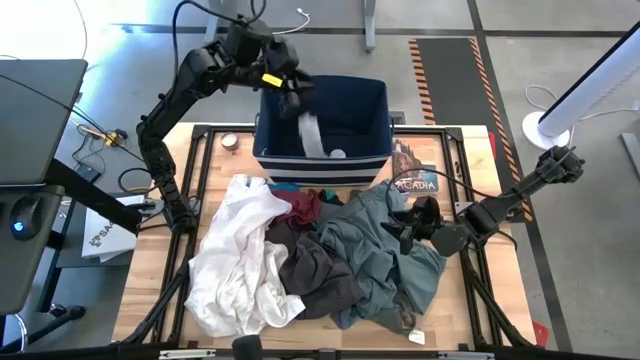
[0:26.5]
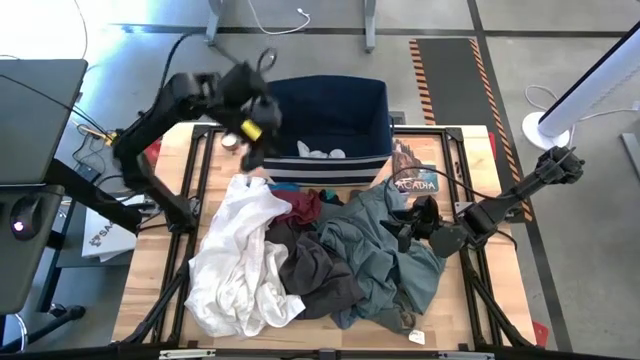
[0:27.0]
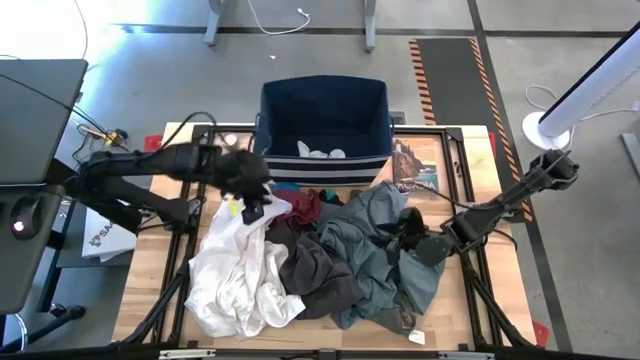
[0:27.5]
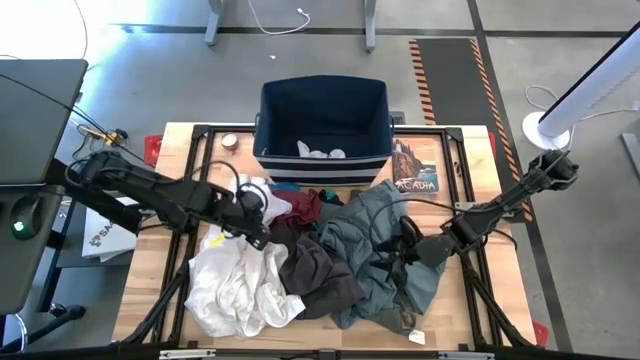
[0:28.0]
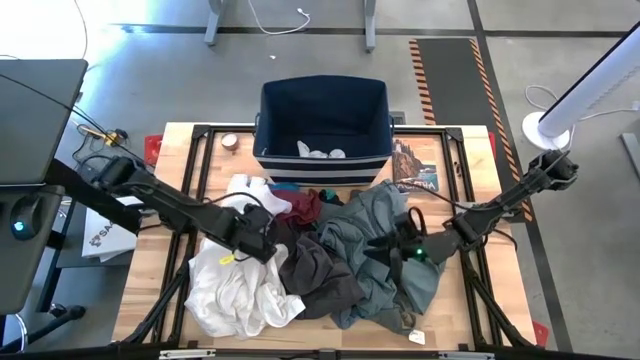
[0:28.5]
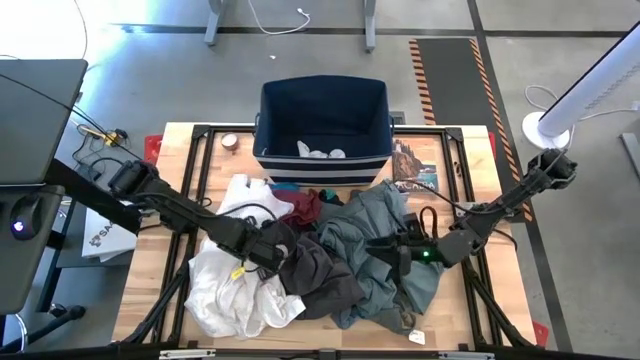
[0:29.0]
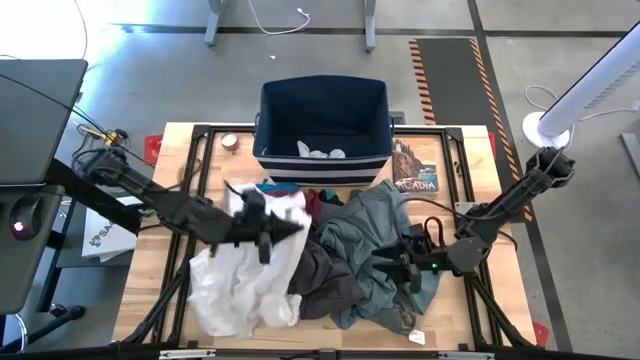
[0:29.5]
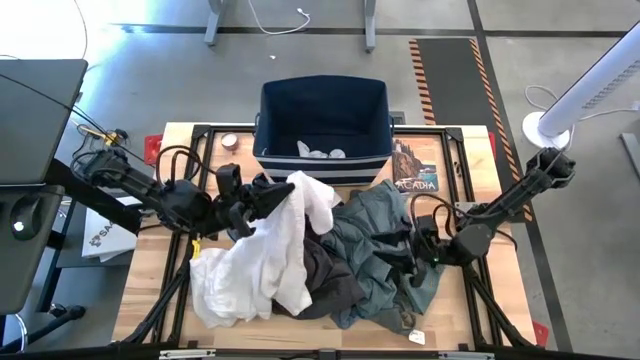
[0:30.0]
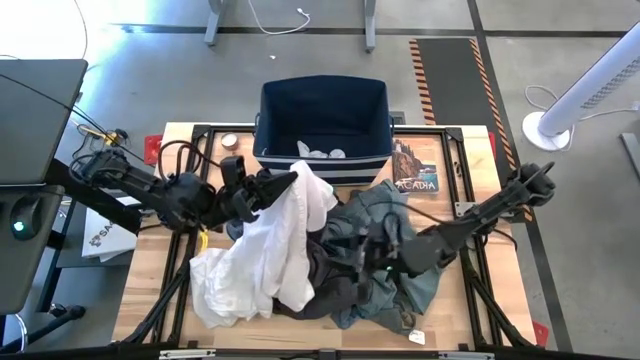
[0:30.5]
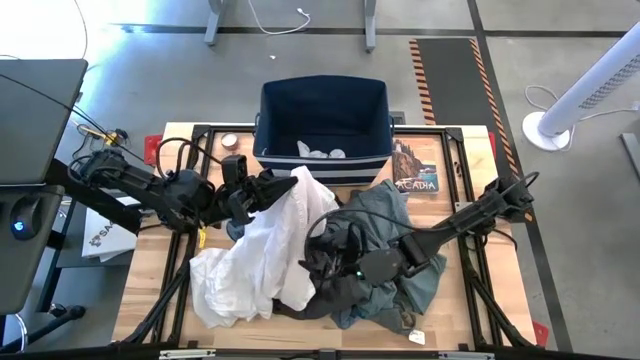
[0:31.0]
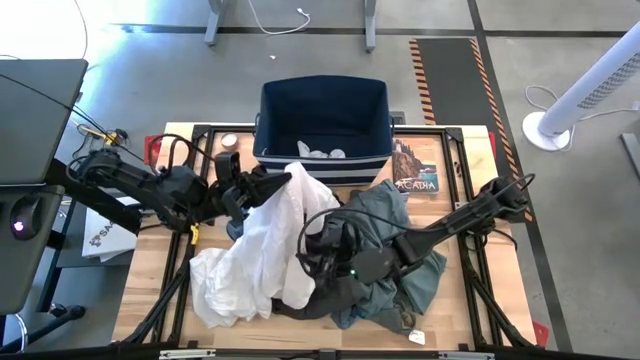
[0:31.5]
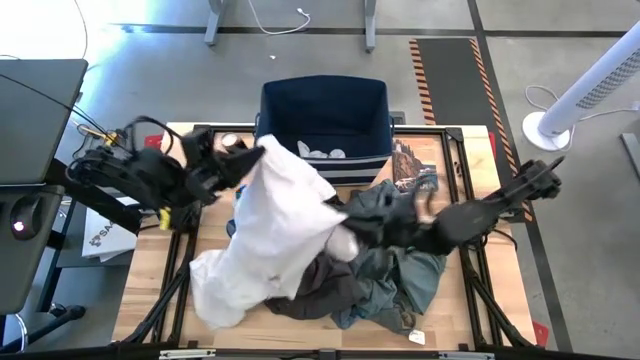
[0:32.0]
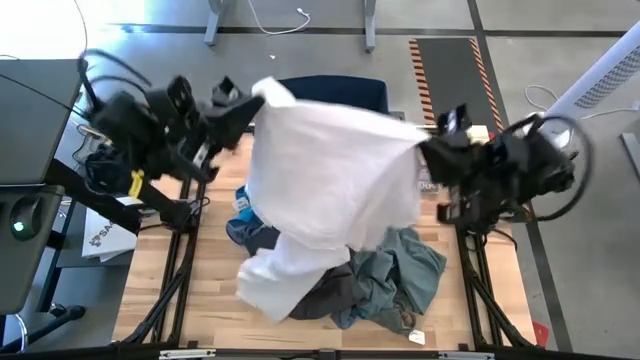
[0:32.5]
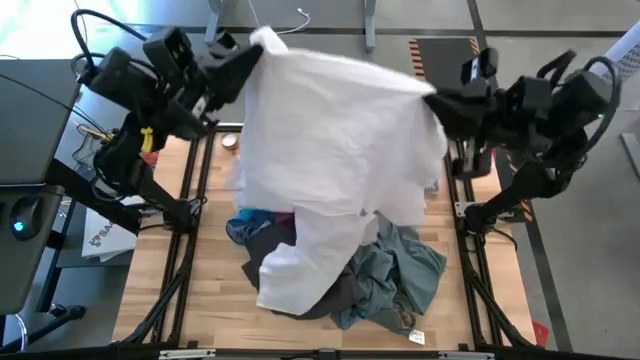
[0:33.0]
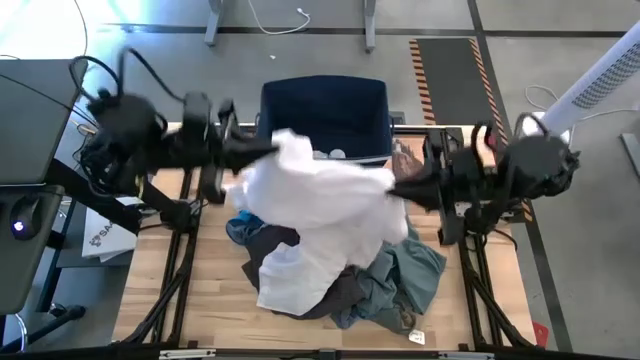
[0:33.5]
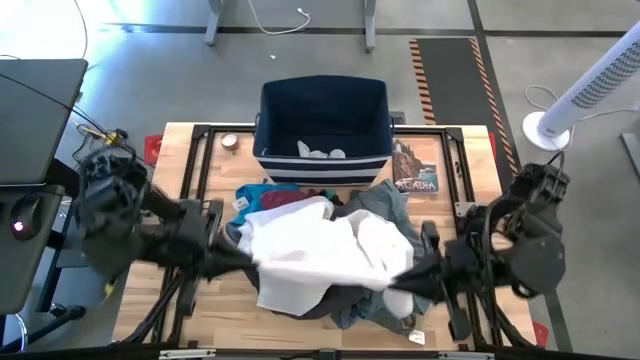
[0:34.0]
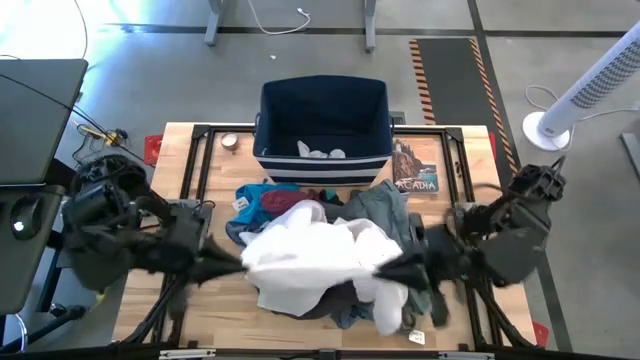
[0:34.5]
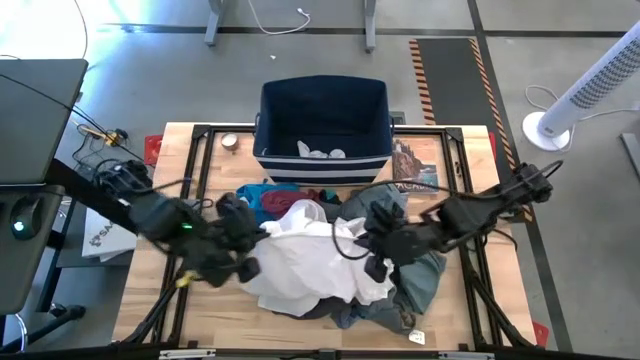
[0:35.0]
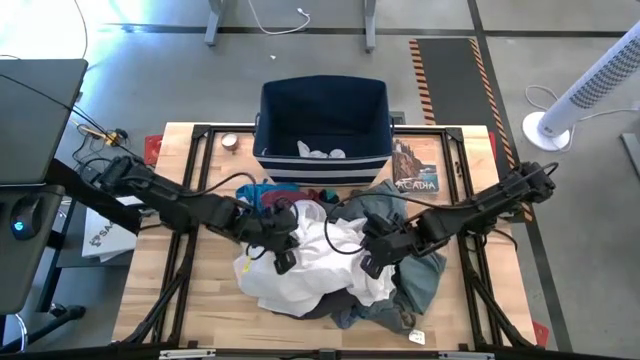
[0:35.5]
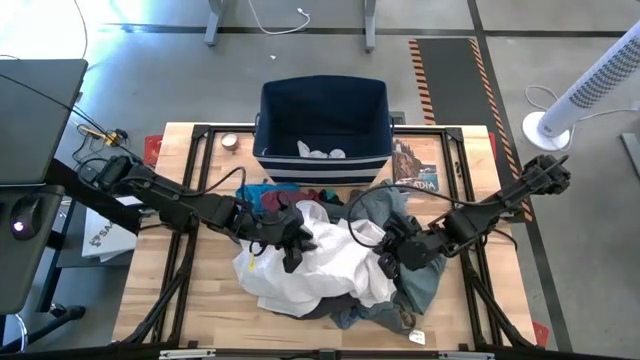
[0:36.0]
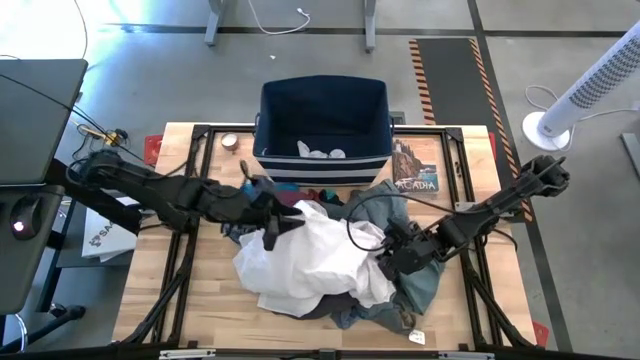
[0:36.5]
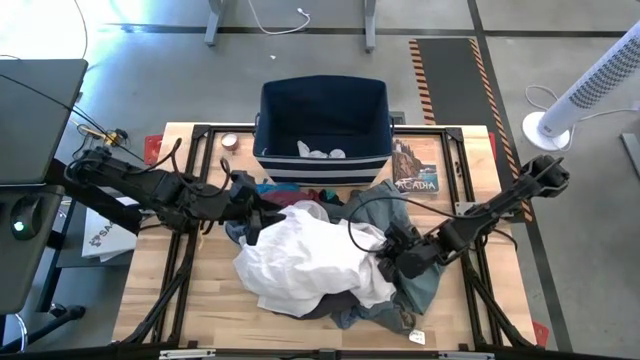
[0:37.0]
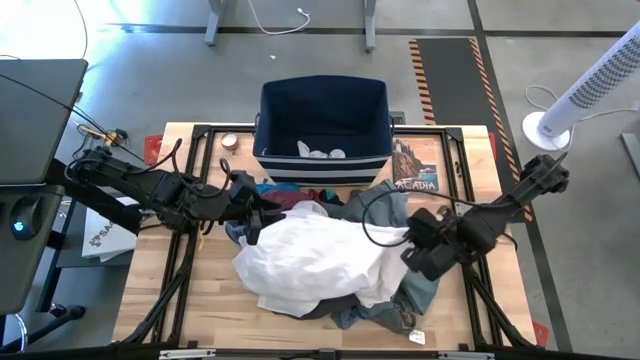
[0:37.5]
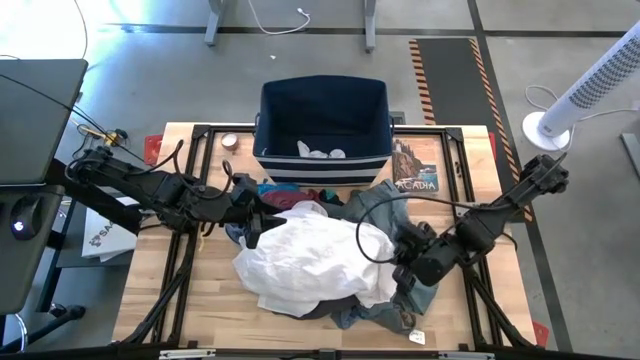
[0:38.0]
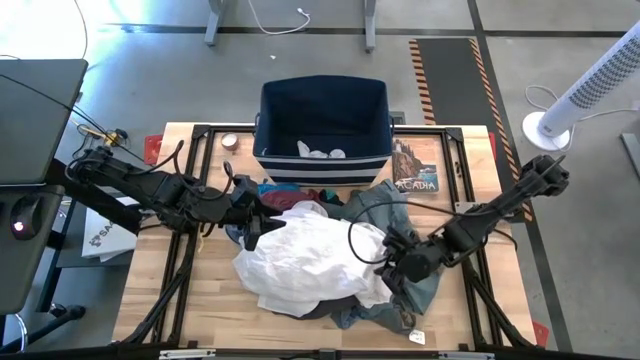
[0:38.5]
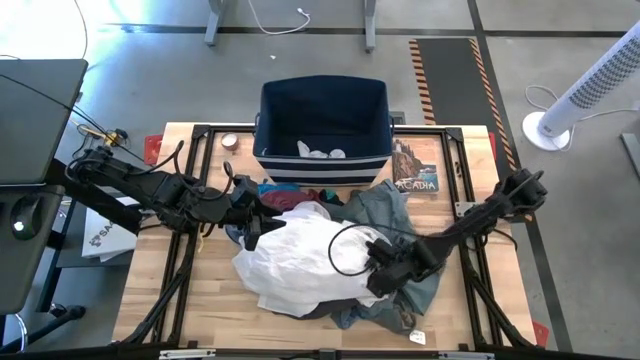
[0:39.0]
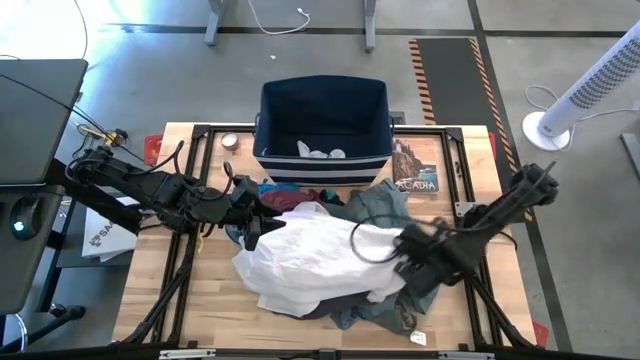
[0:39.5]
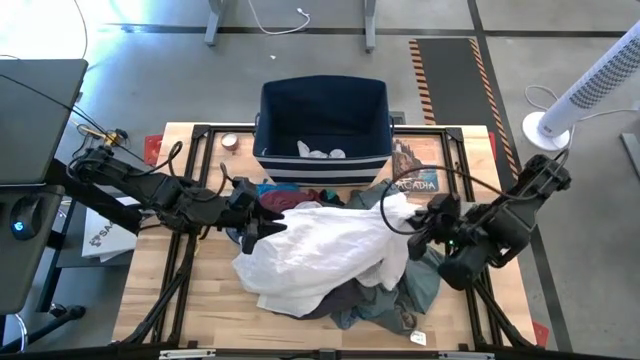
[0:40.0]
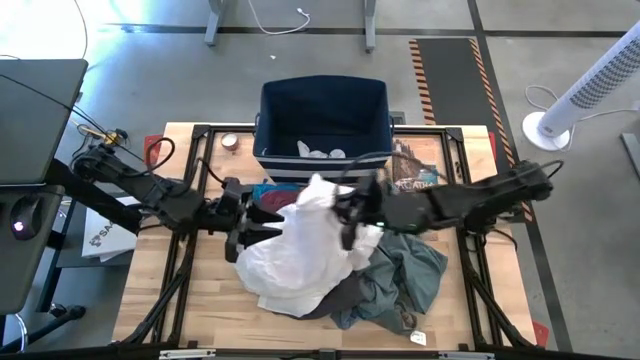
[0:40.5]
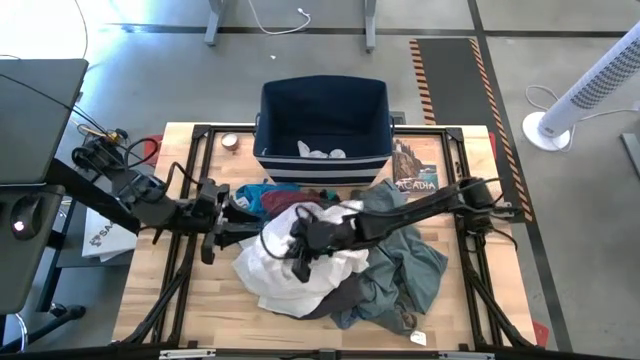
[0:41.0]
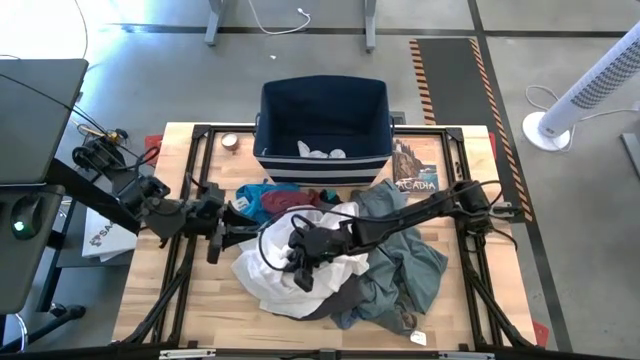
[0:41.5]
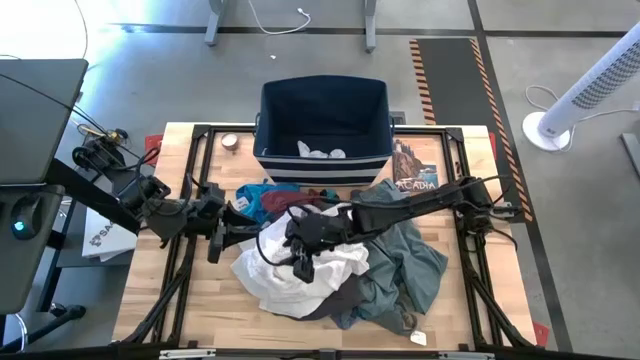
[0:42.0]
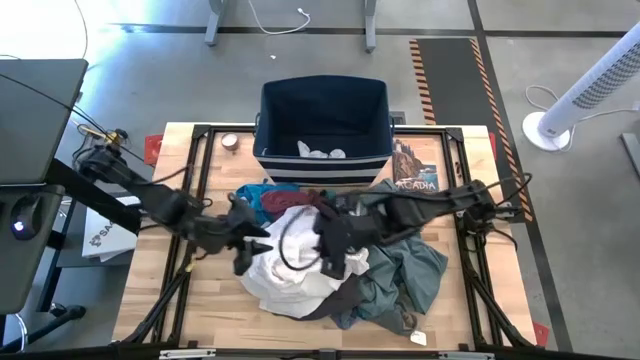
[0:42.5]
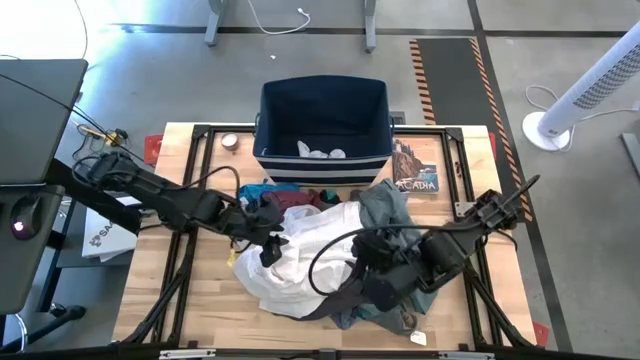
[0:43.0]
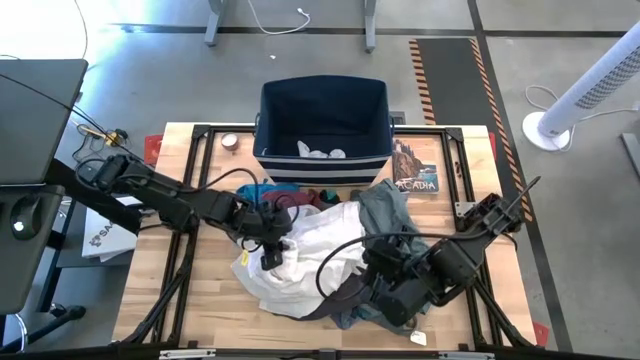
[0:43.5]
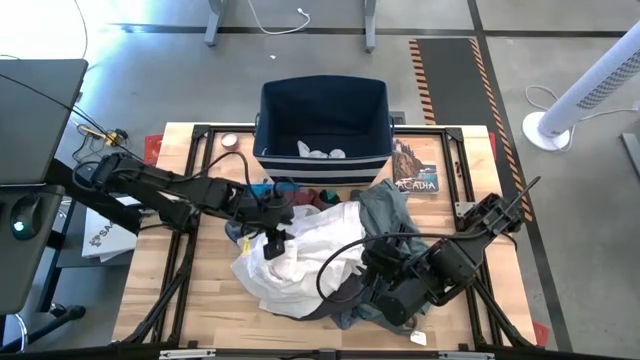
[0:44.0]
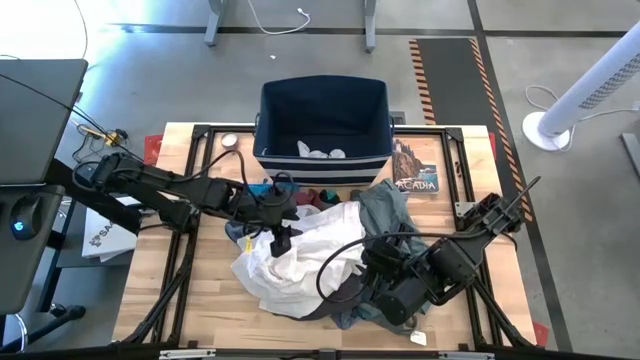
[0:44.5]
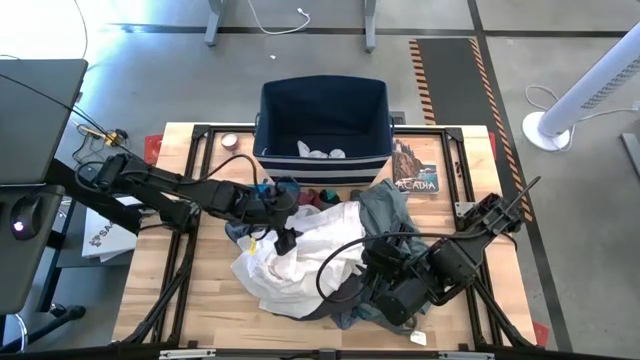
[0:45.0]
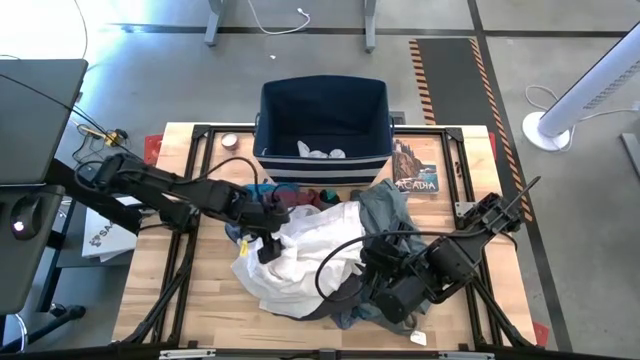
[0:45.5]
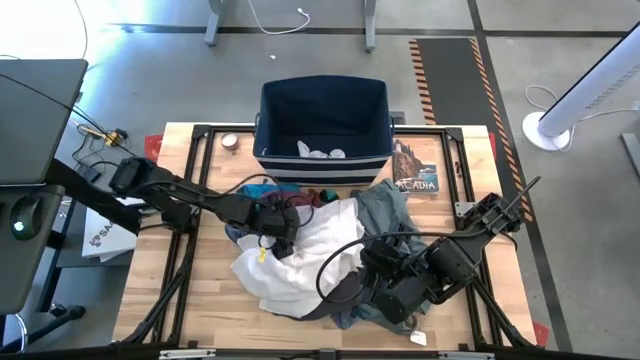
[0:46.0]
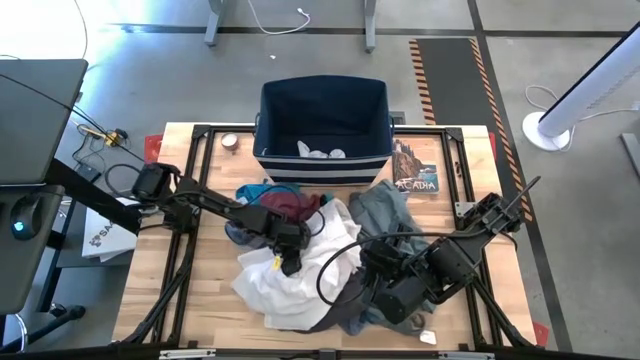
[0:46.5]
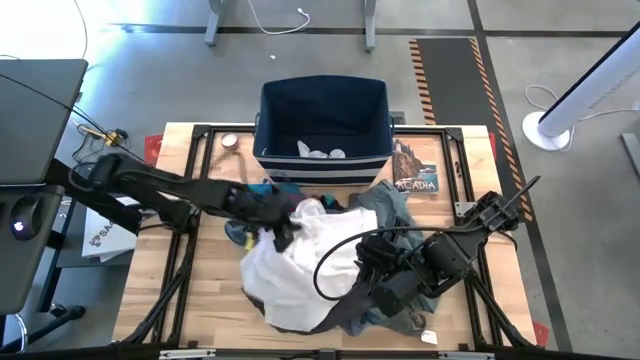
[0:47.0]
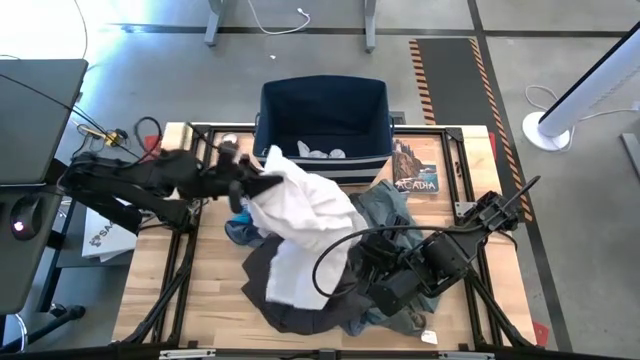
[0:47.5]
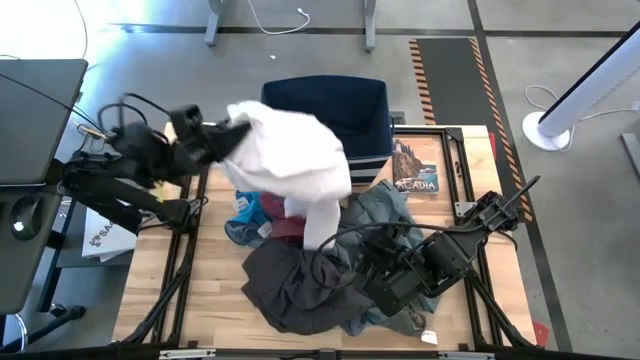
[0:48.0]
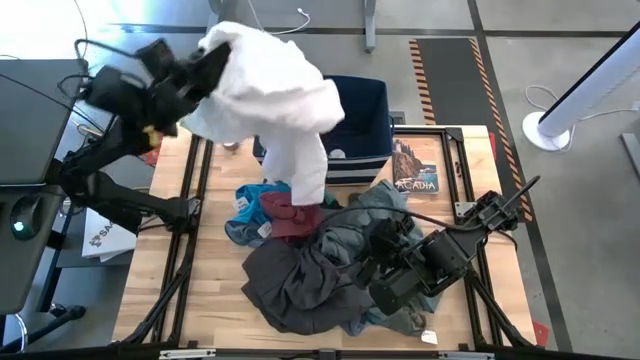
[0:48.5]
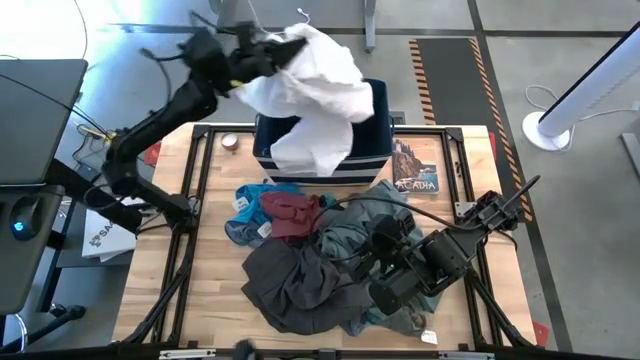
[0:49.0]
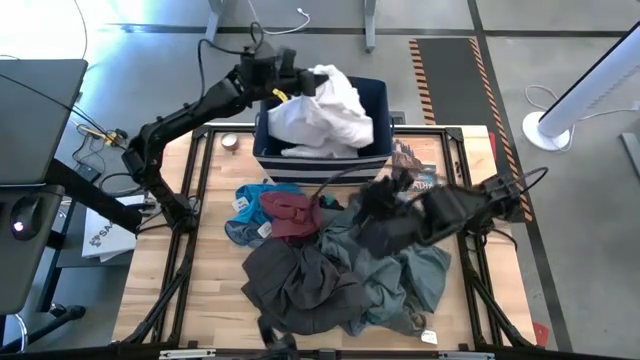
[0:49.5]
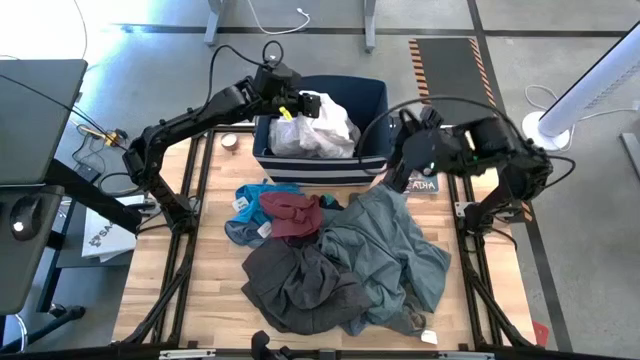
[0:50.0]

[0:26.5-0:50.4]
Task: Sort clothes
Put the white polo into the blue laundry bin
